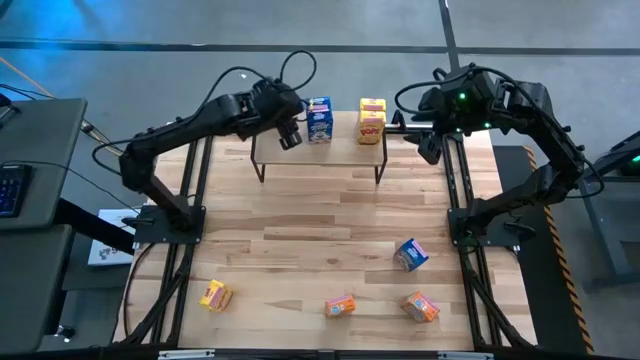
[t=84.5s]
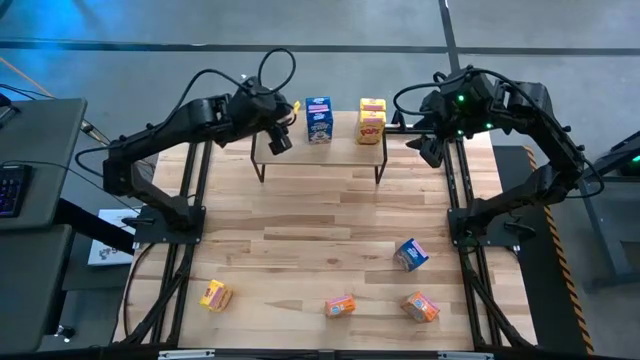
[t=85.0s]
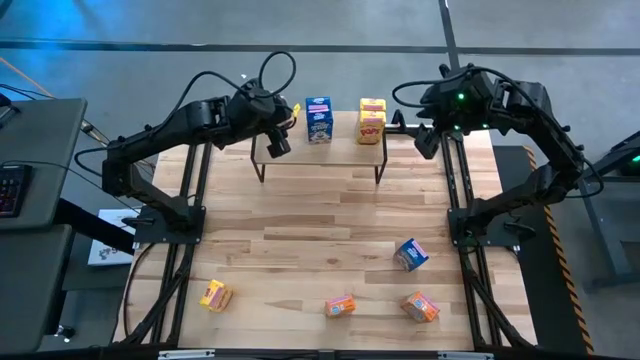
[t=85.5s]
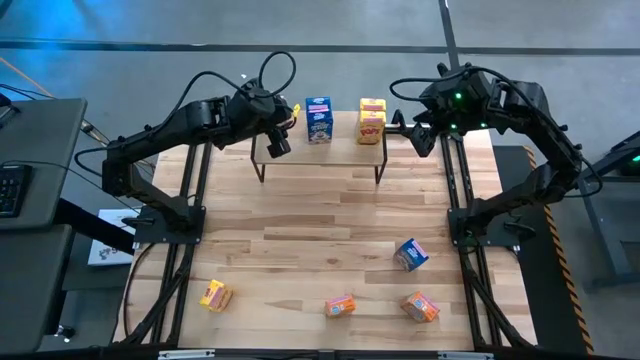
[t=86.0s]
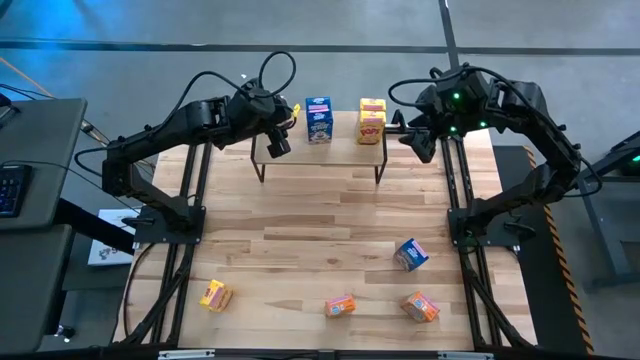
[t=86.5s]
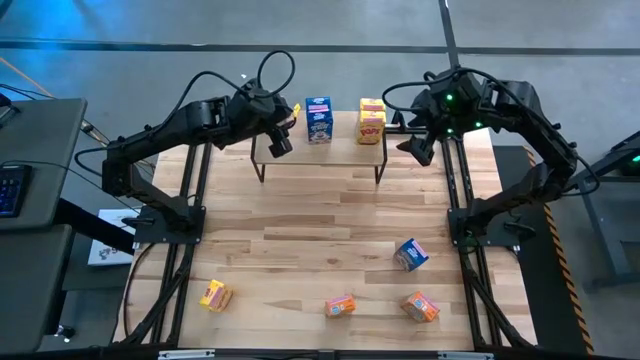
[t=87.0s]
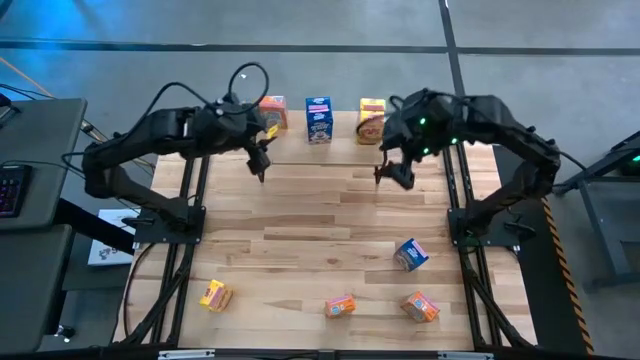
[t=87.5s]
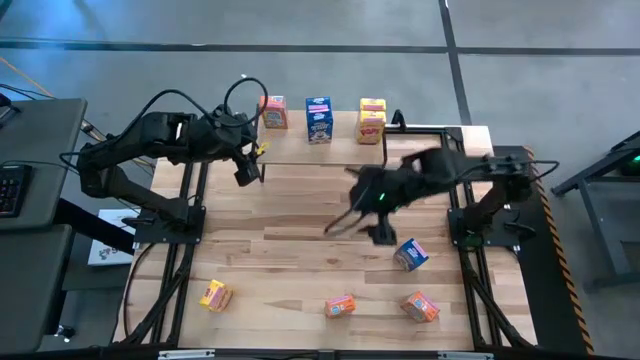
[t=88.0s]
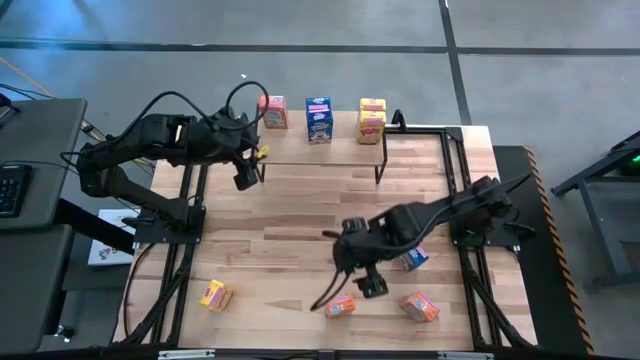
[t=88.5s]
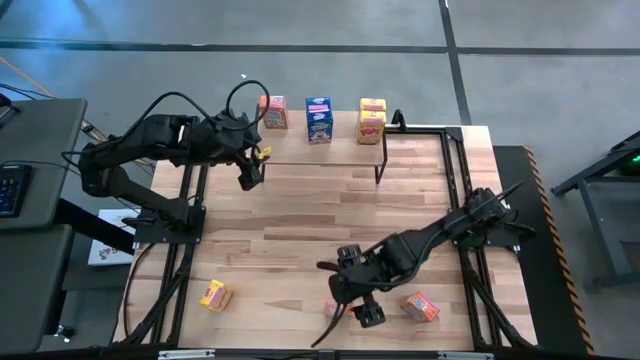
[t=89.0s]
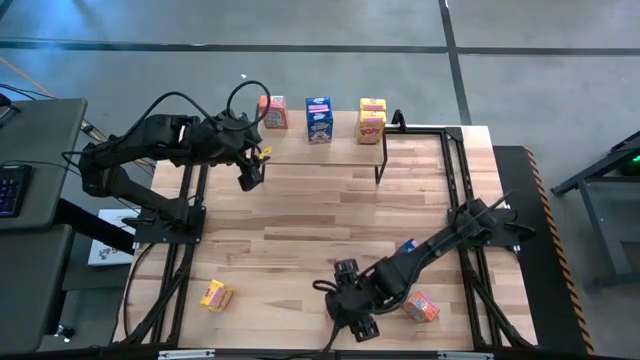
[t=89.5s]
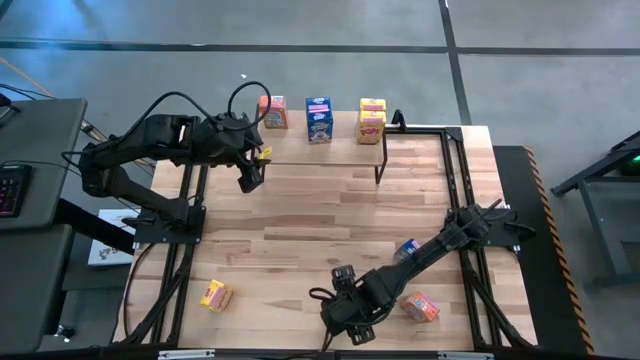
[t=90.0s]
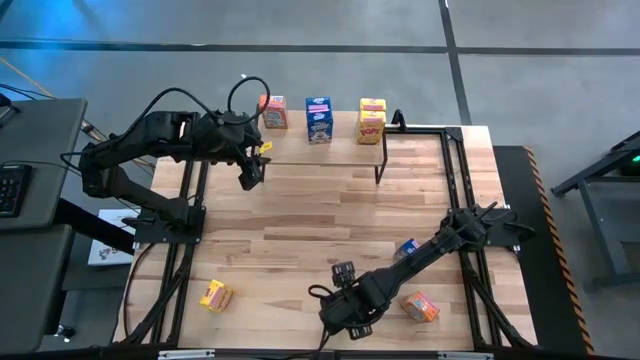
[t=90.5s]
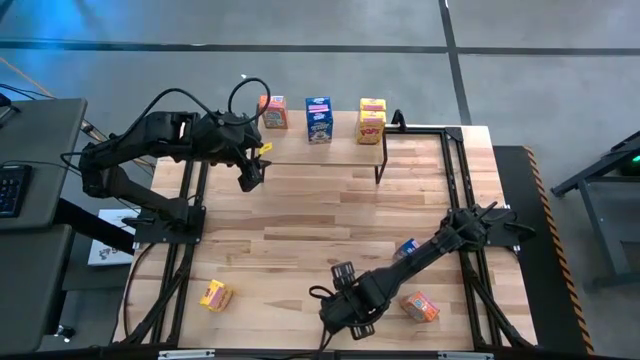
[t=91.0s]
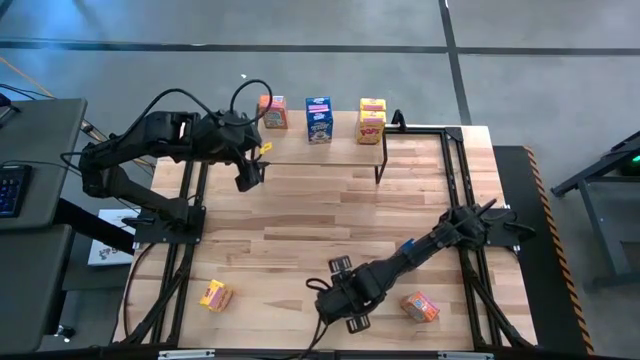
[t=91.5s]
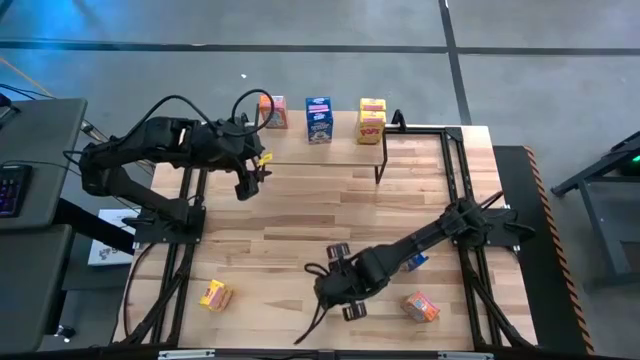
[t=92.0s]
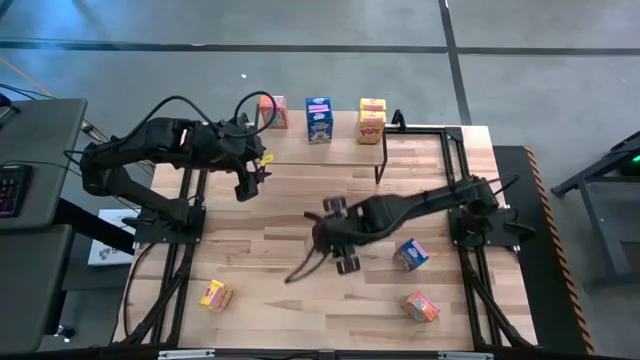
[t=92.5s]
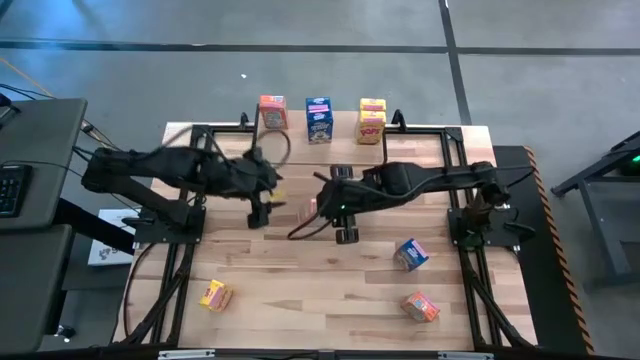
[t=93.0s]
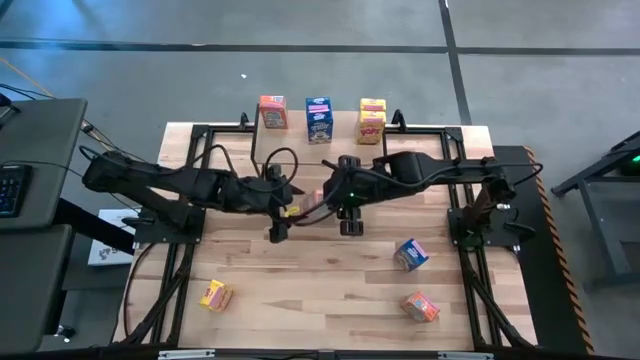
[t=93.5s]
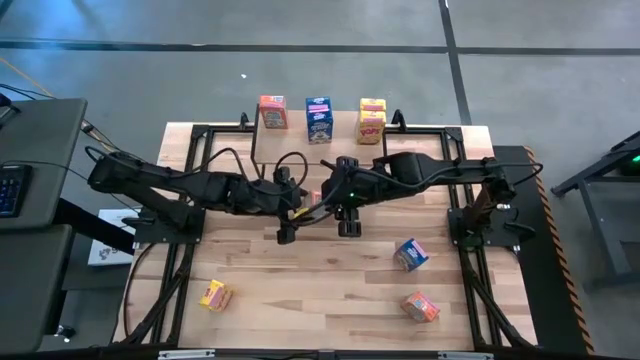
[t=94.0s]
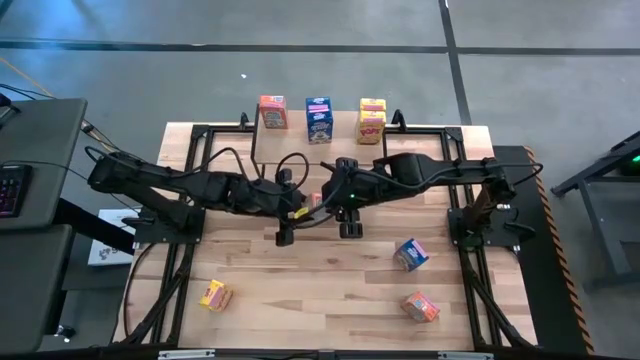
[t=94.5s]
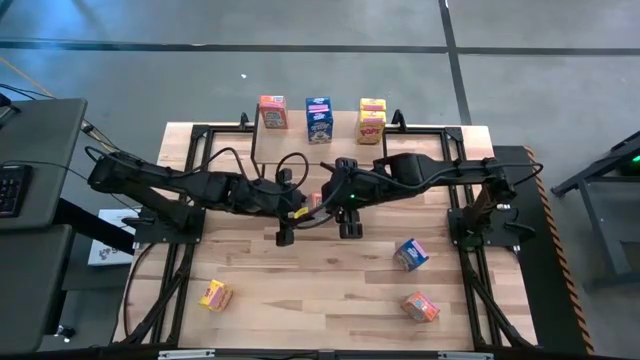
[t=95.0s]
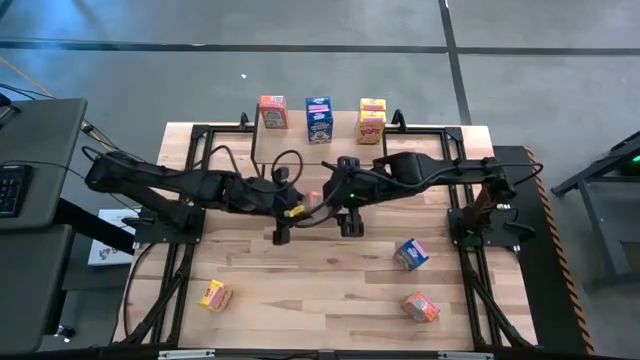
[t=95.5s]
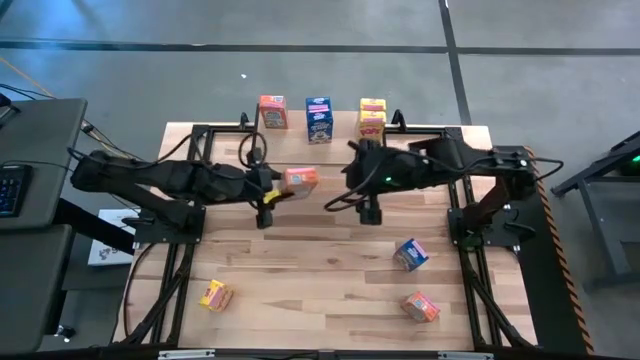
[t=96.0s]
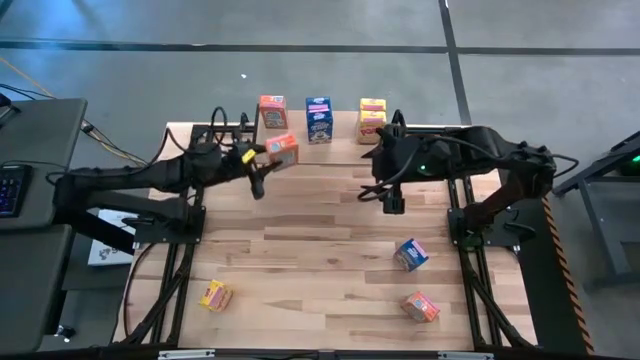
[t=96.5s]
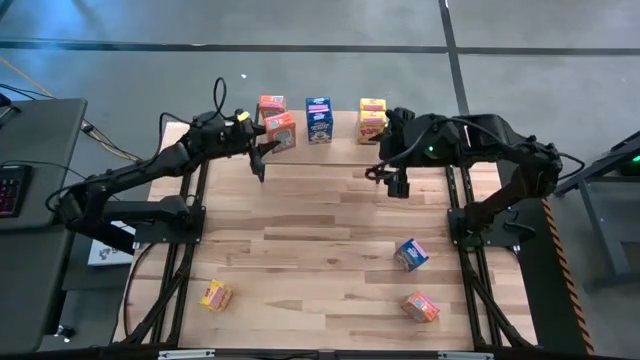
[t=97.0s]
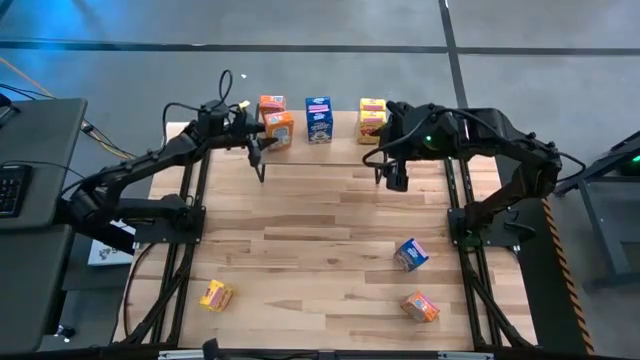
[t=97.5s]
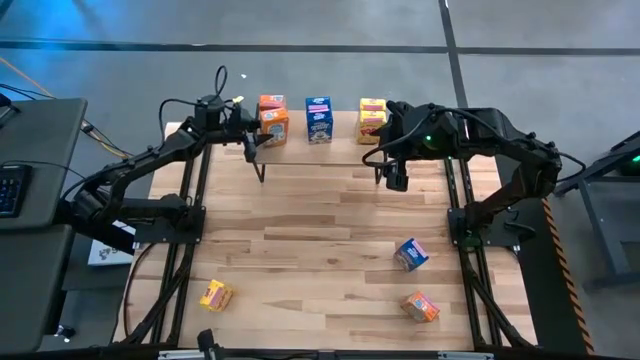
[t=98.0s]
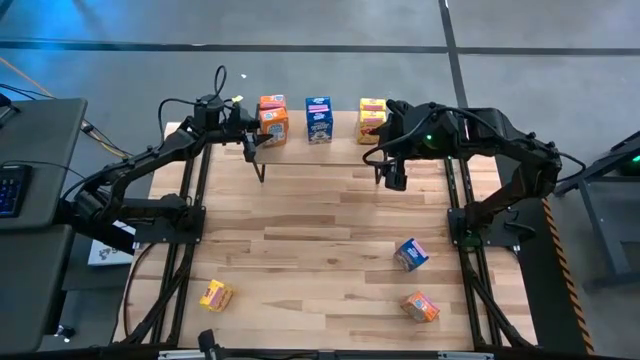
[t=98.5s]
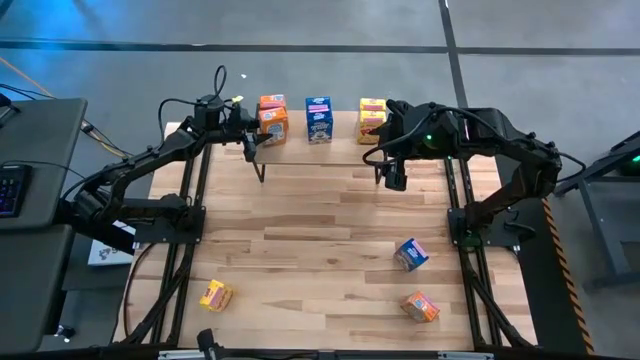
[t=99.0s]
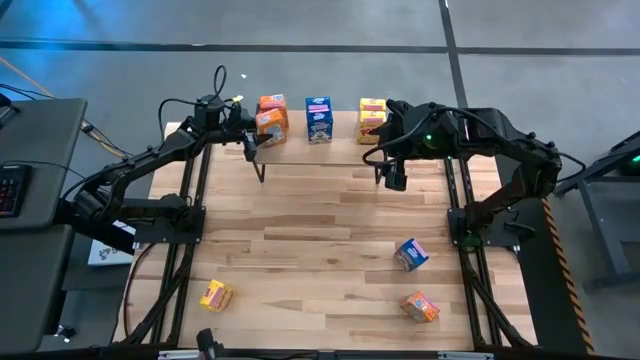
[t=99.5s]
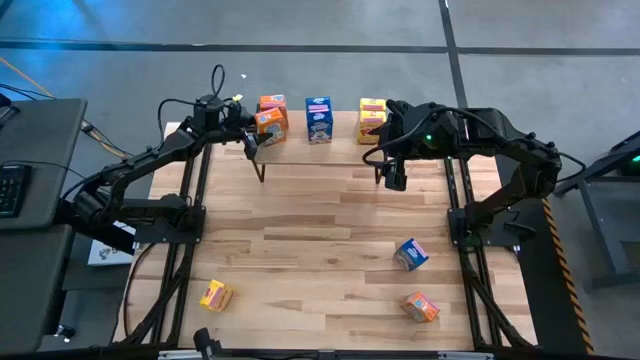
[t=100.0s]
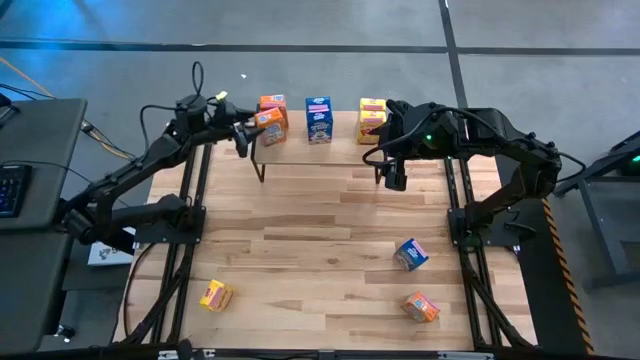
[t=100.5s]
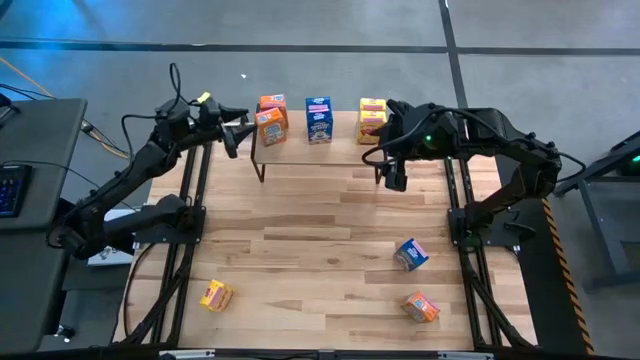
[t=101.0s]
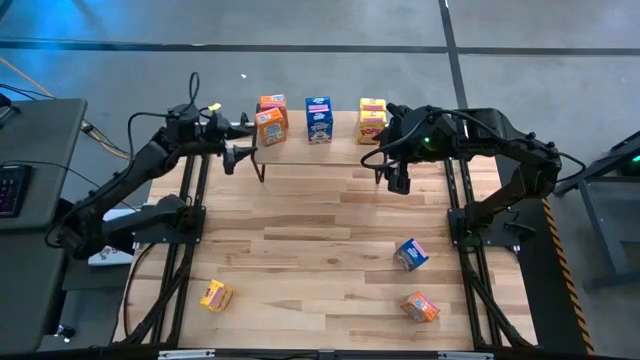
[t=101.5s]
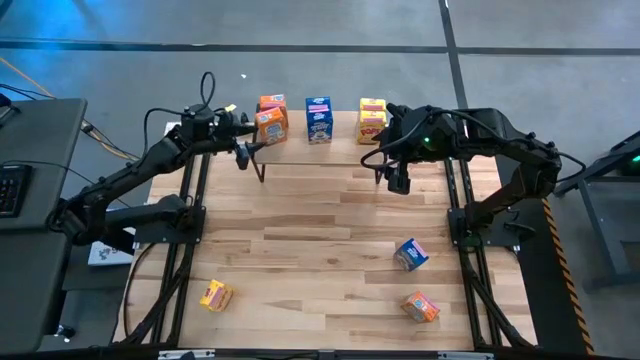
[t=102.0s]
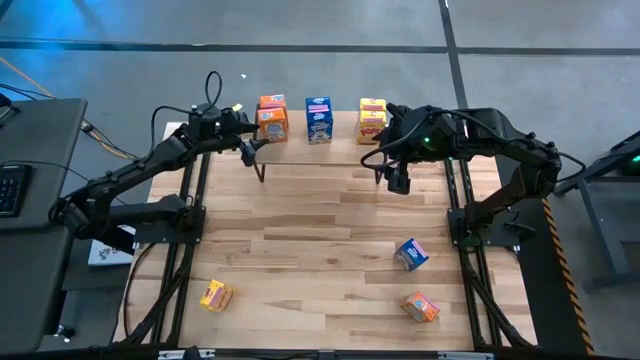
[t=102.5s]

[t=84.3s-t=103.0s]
Task: Stack cereal on shelf
Put the left orange cereal box on the shelf aligned with the other orange cereal box

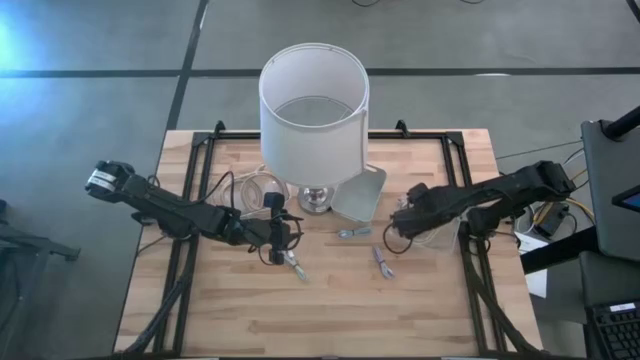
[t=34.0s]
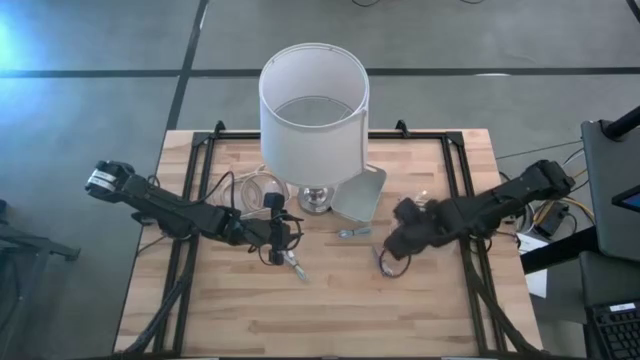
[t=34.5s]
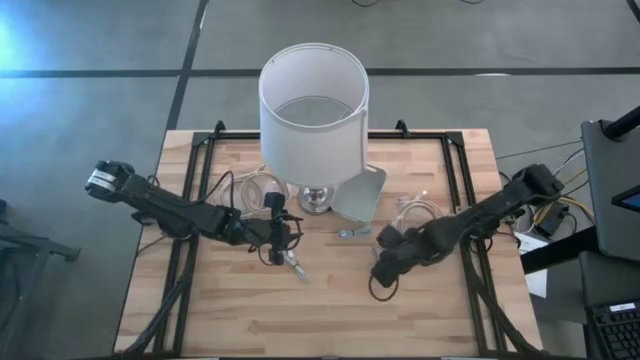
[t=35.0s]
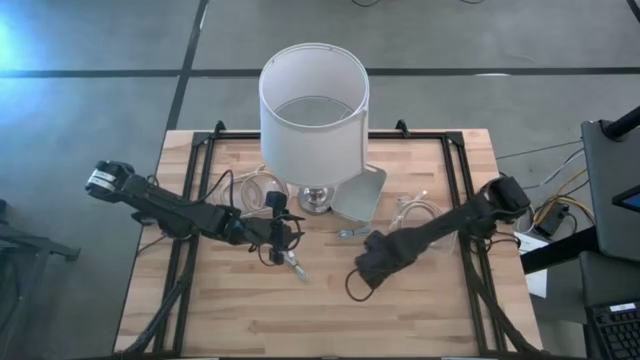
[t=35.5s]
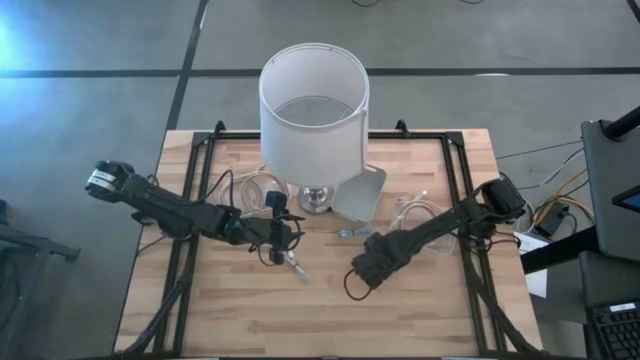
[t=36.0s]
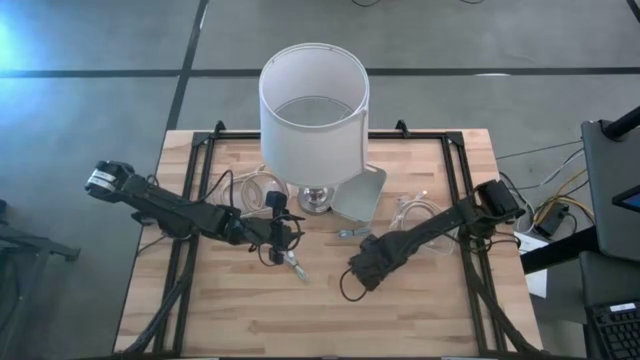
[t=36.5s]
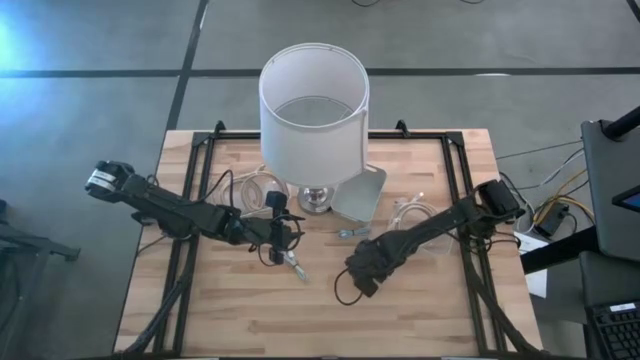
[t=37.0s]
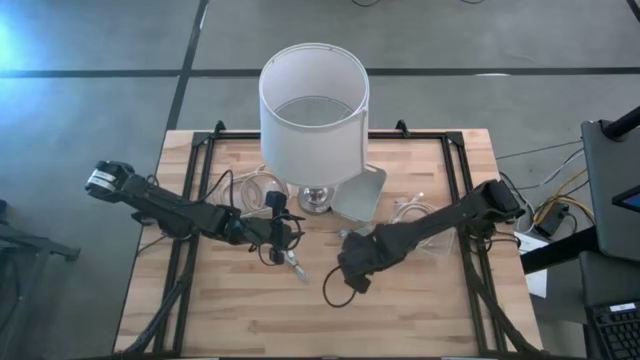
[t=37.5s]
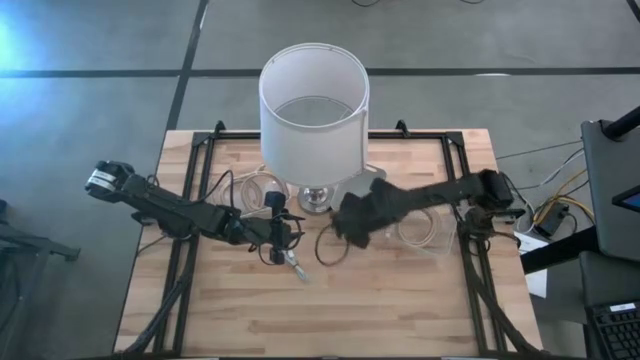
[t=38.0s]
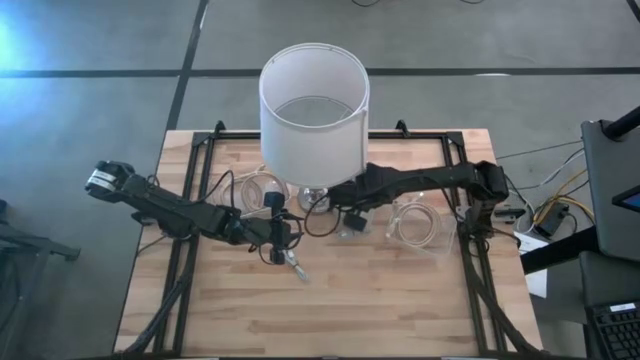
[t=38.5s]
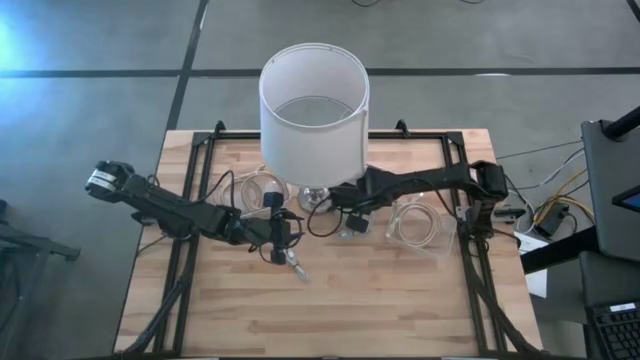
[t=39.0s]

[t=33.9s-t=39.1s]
Task: Pick & Place USB Port
Put the purple charger cable into the gray bin
